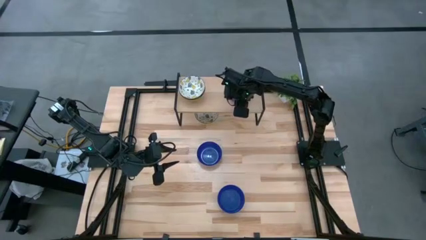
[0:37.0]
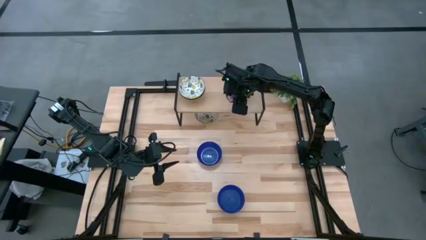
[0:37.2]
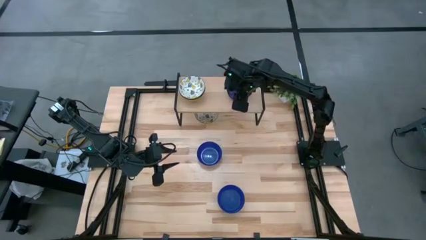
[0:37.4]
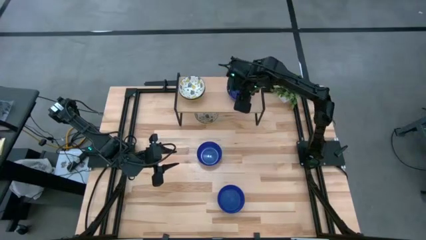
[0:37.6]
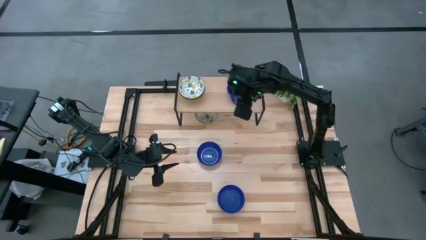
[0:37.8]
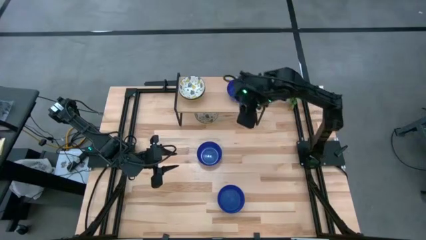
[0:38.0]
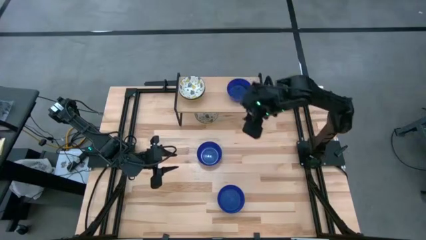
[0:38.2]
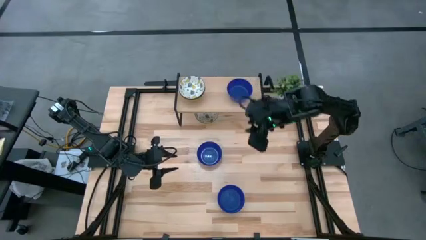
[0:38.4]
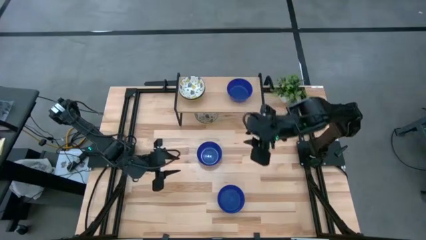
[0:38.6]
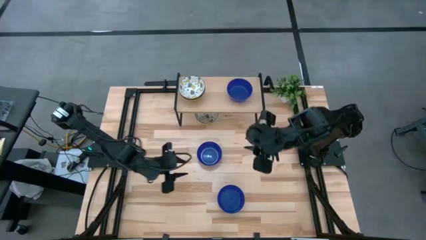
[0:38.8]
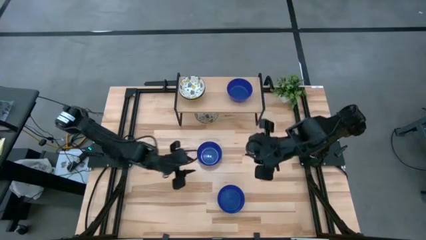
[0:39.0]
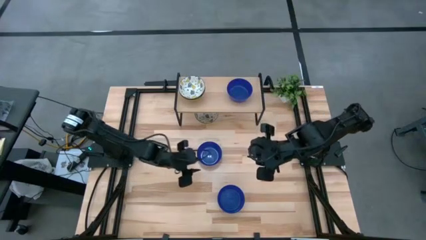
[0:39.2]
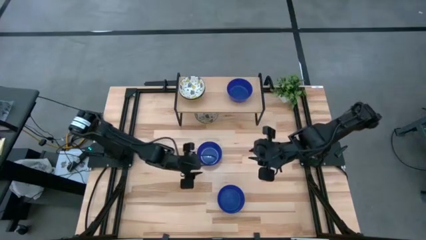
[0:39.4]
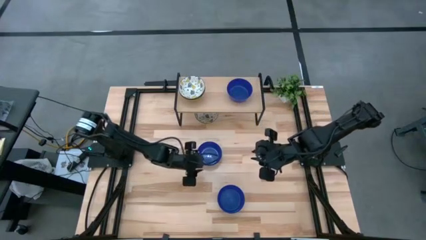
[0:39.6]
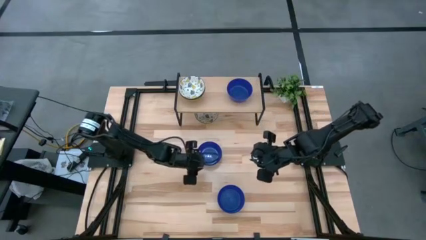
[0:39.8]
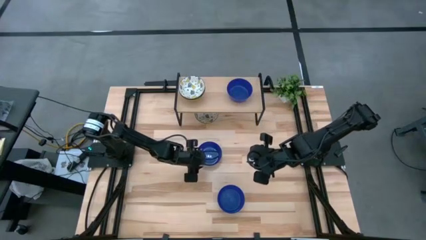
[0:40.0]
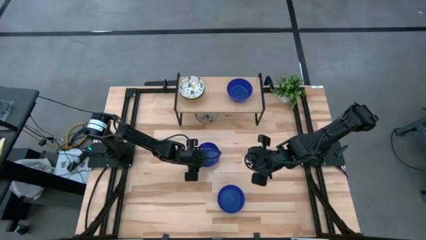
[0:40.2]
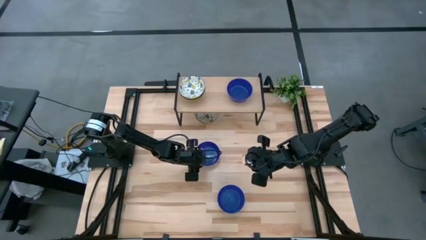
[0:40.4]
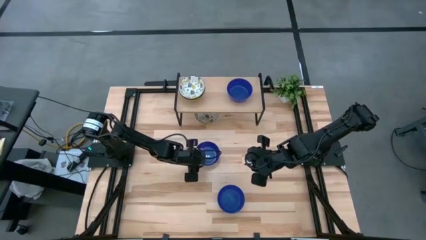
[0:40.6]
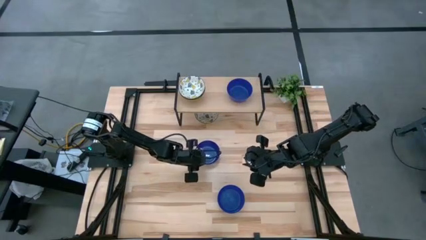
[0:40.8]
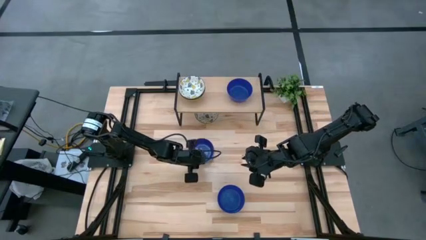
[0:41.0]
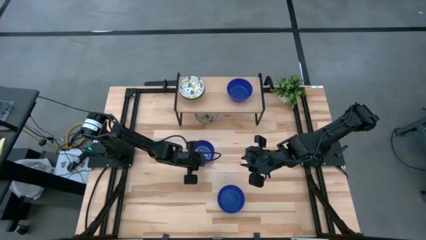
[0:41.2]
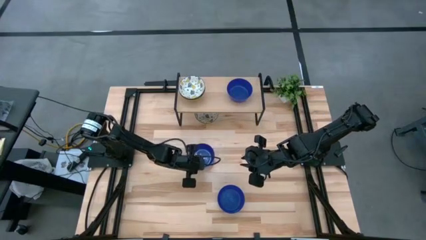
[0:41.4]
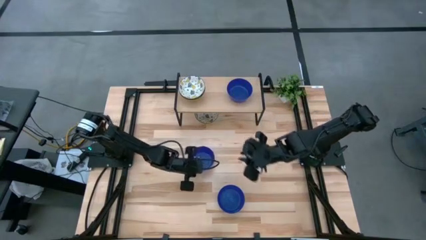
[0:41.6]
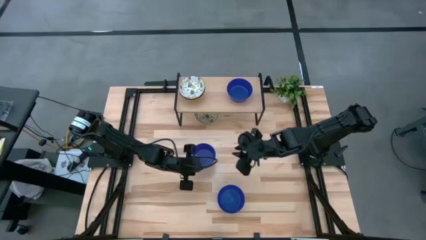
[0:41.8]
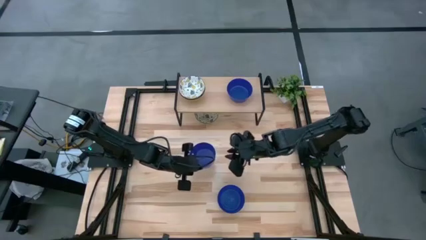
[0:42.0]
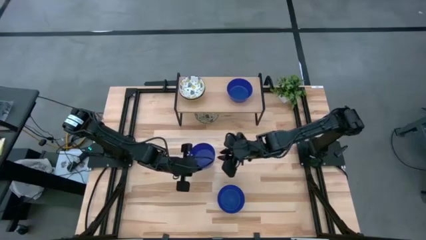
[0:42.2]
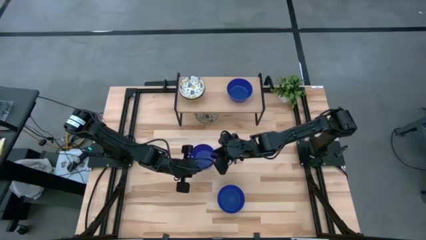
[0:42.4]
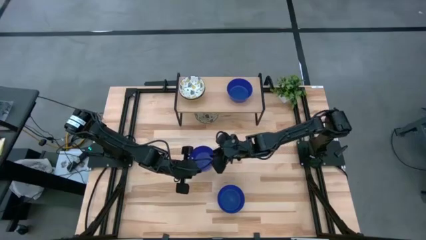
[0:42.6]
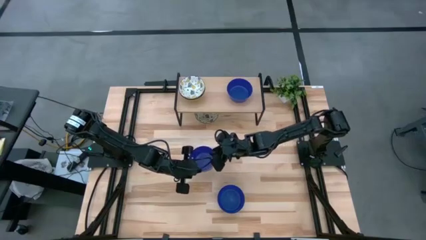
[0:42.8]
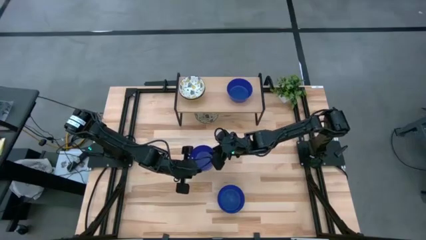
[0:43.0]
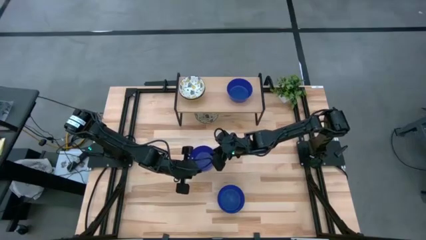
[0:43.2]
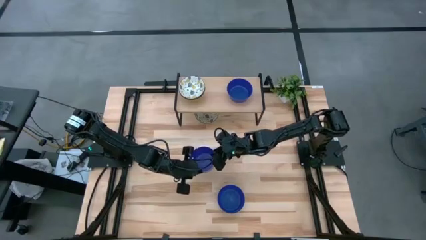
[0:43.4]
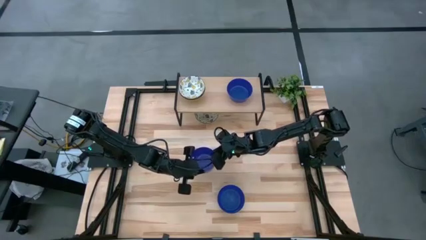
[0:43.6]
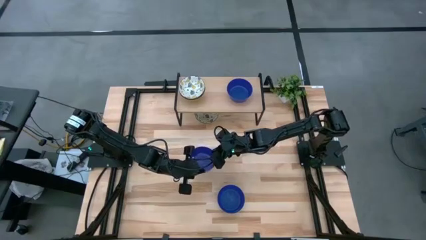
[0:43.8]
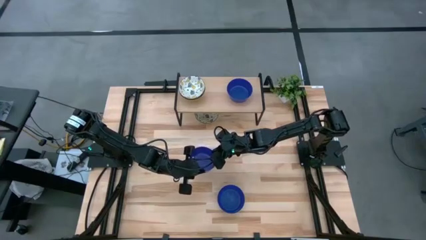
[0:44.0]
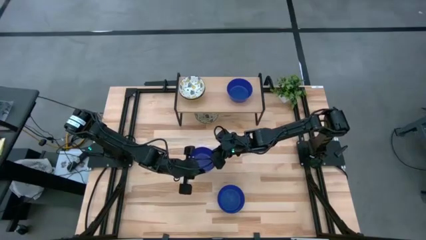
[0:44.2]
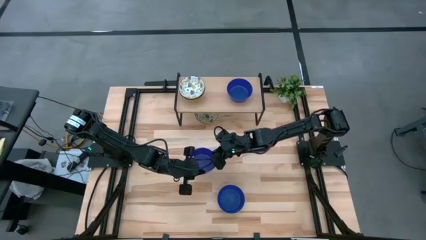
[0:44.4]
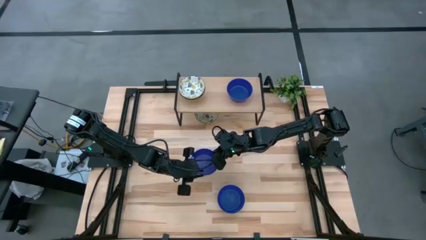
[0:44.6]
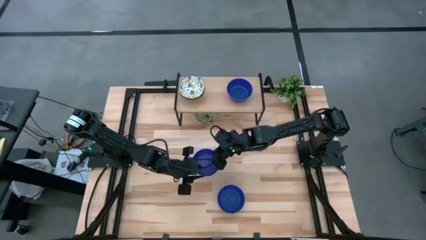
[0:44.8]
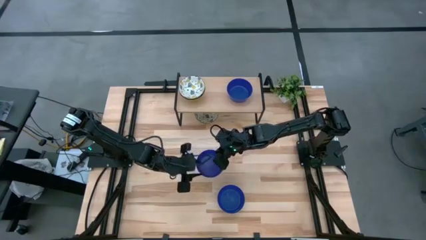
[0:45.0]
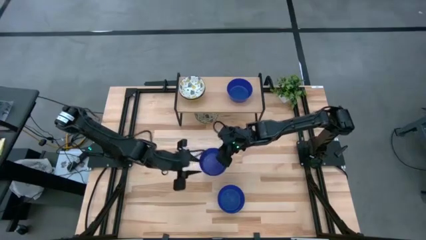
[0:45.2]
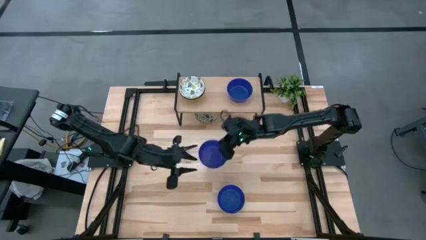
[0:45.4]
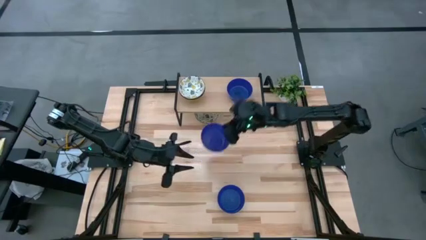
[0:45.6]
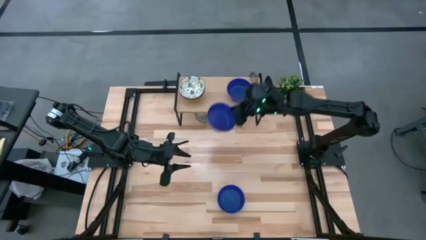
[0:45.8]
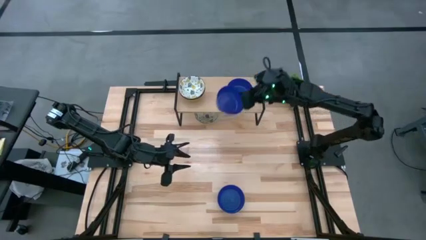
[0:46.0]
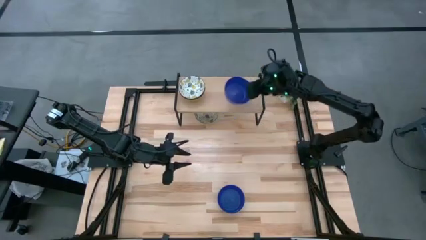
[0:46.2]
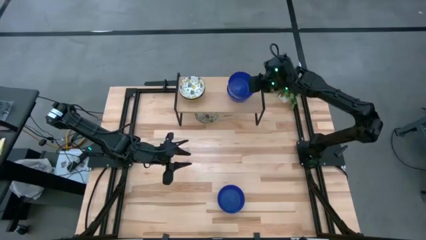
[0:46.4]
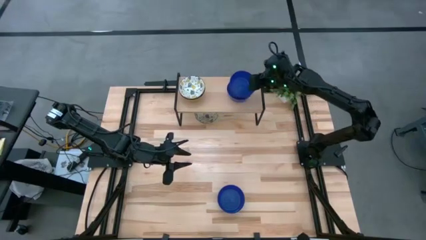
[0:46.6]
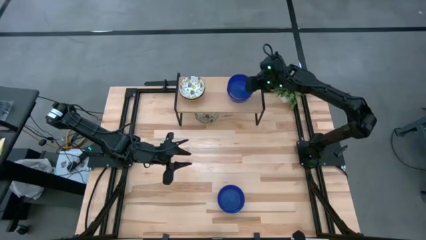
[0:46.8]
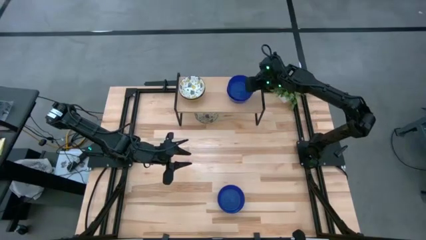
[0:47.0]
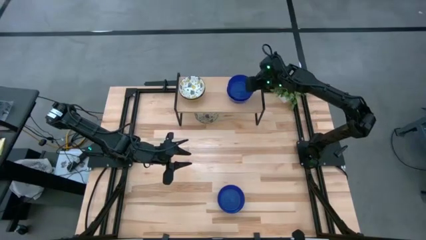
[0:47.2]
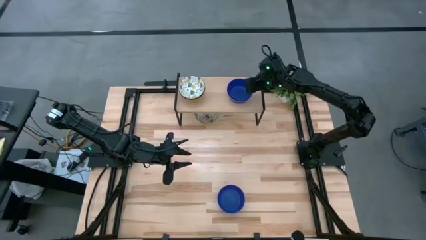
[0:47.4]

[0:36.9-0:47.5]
Task: Pick & Place Mini bowls
Stack the top blue bowl on top of the blue bowl on the shelf

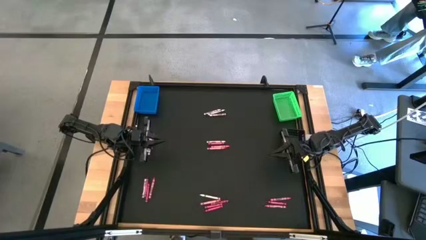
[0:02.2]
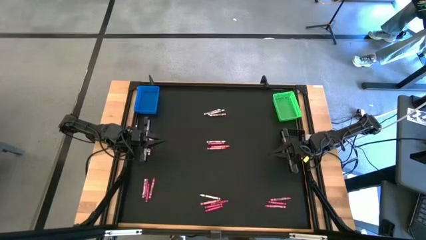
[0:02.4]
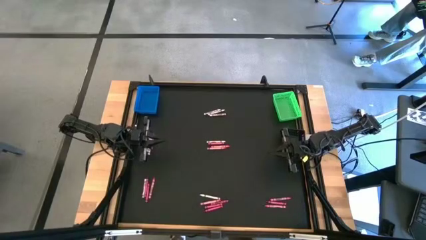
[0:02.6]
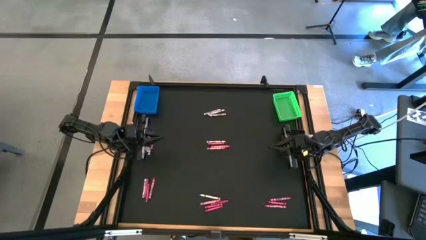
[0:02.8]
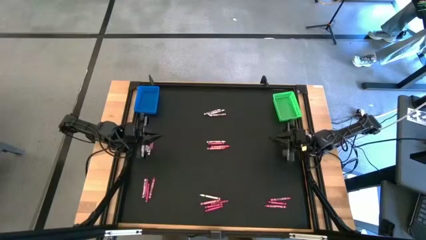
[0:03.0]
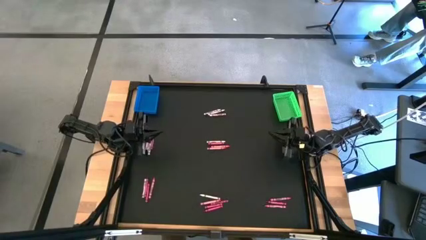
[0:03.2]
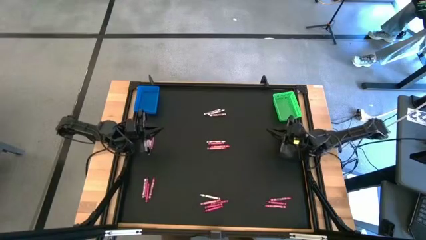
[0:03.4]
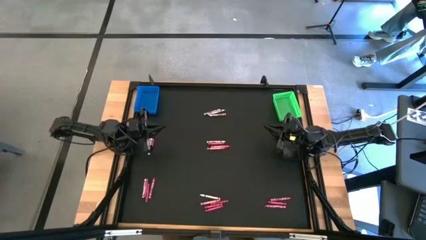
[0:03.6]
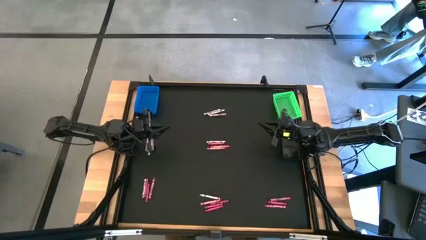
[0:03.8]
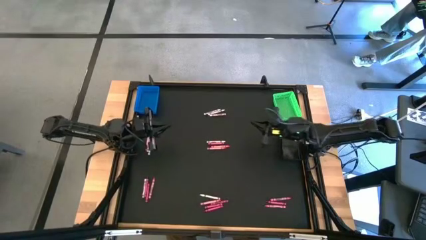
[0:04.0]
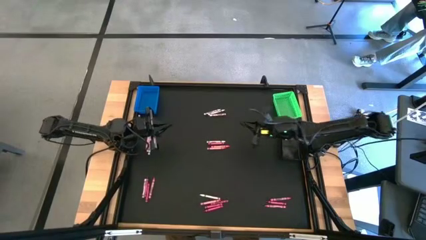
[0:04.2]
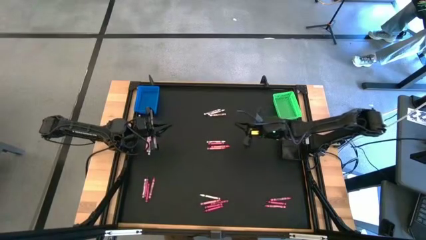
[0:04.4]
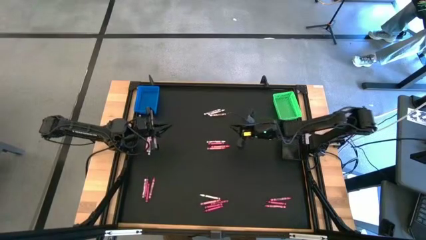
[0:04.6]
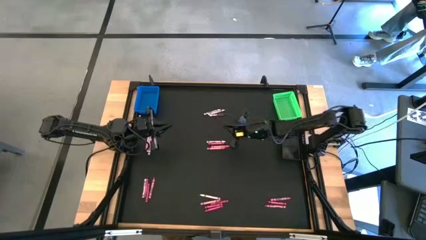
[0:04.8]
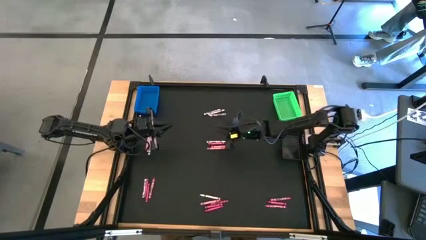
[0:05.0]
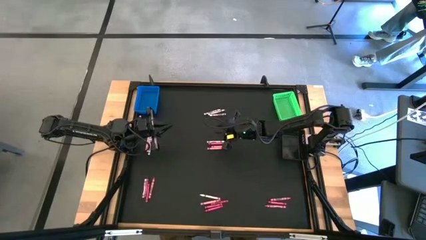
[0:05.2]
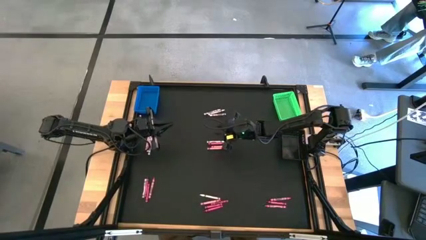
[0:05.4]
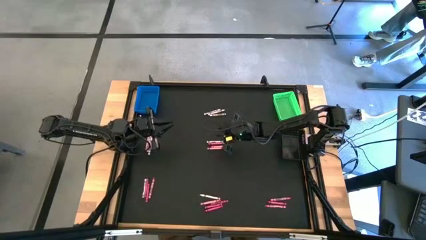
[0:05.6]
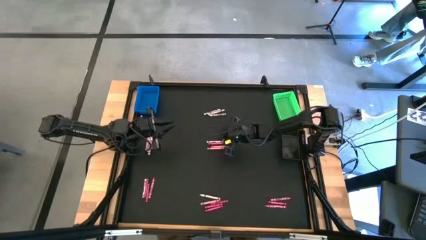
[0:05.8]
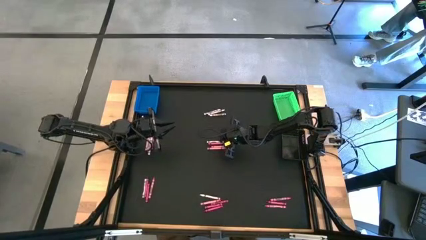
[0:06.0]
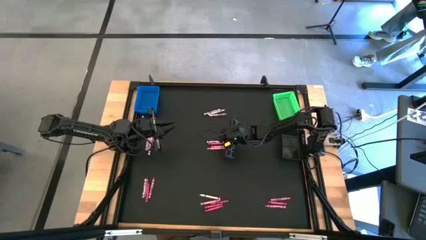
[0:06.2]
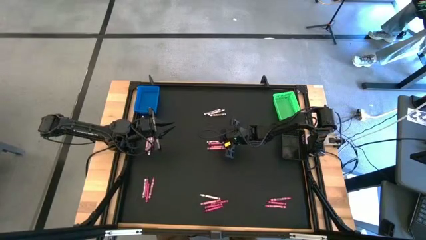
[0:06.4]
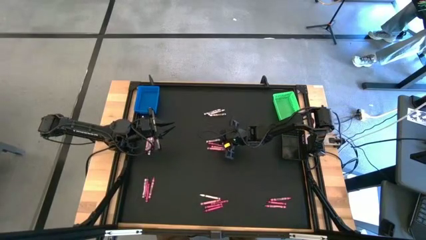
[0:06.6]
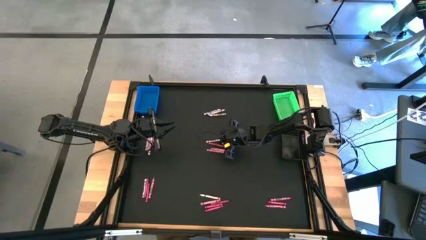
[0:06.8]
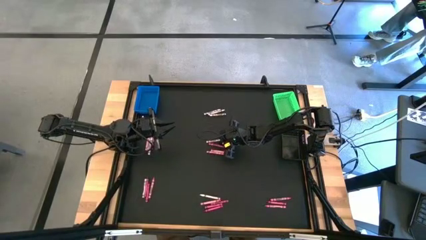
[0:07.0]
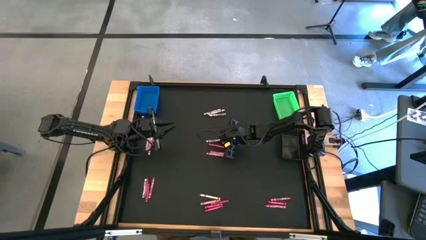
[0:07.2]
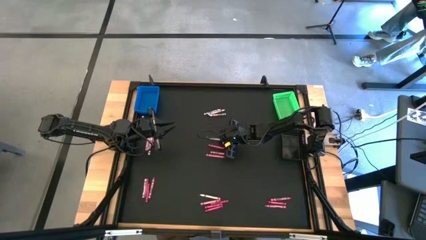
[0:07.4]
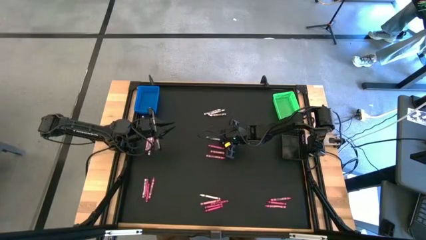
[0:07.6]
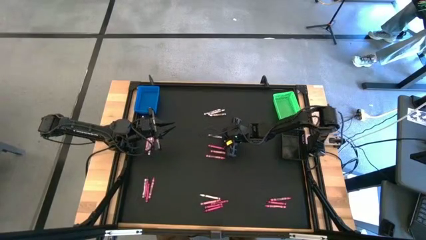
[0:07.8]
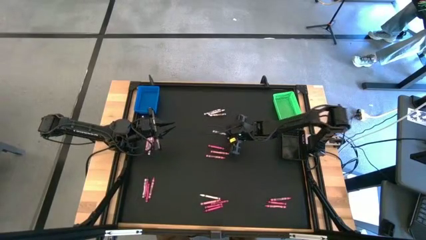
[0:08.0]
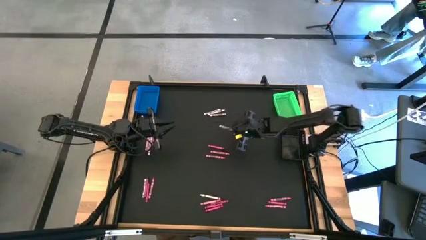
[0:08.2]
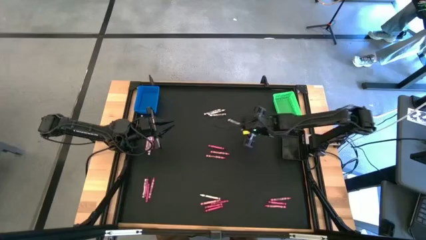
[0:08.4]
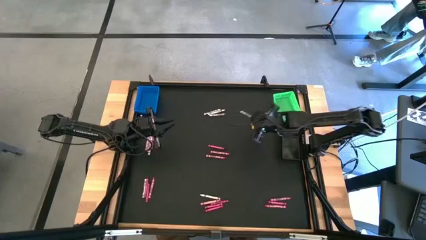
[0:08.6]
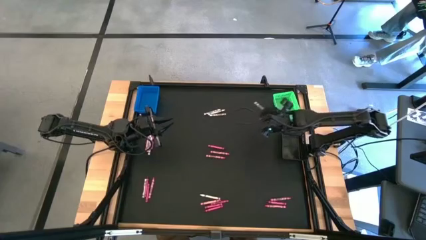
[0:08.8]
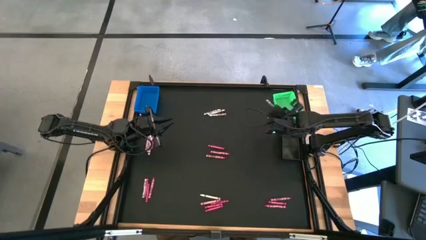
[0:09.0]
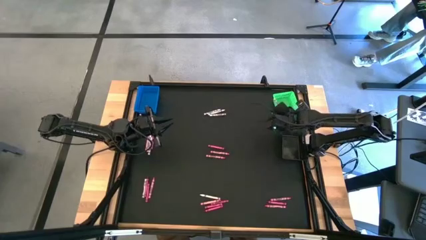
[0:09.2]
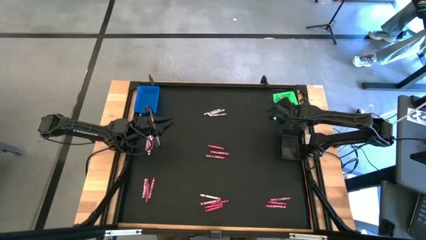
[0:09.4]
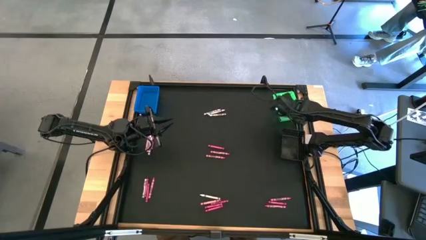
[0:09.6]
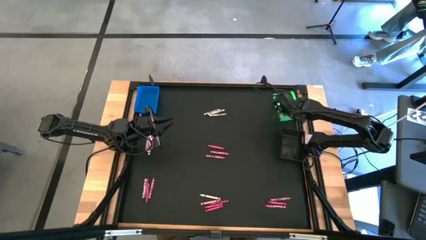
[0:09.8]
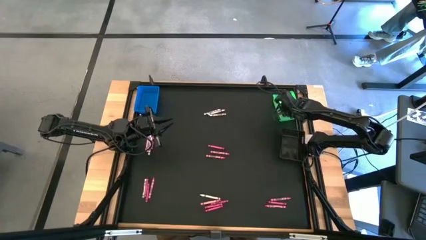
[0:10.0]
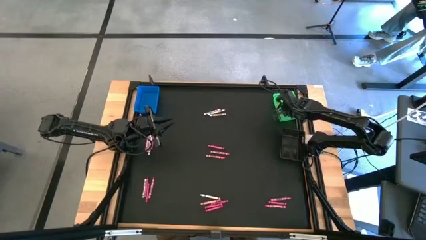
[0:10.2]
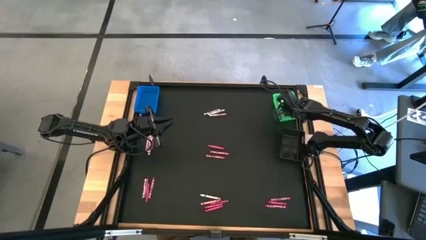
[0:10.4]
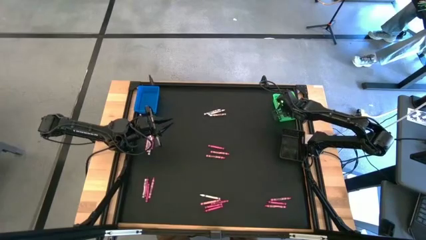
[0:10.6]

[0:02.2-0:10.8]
Task: Sort crayons
Put the white crayon into the green bin
